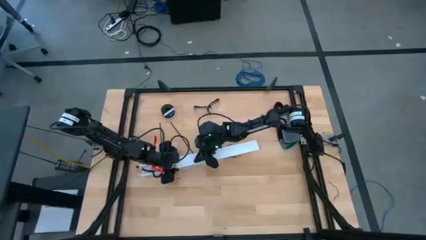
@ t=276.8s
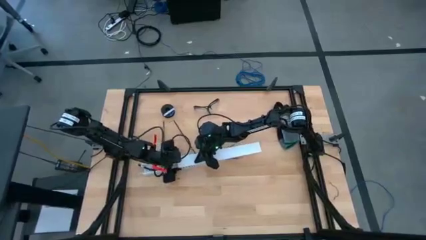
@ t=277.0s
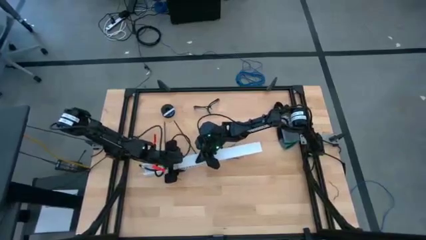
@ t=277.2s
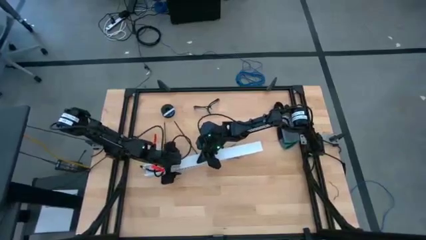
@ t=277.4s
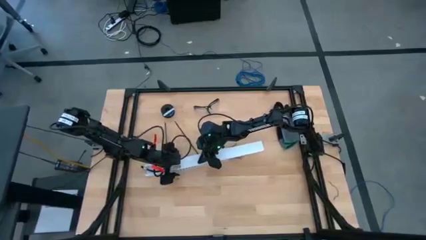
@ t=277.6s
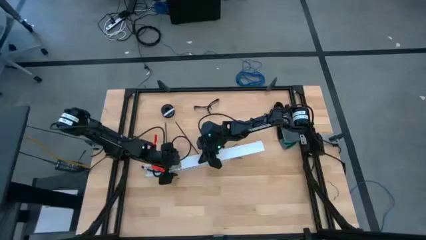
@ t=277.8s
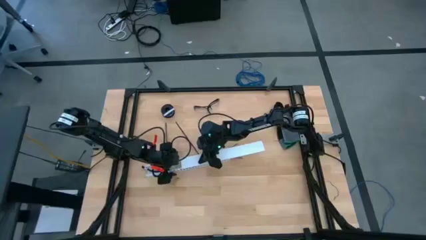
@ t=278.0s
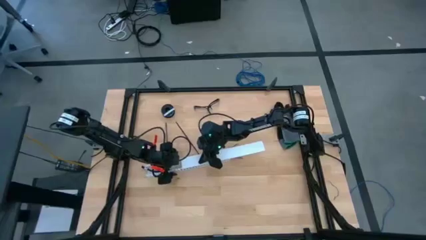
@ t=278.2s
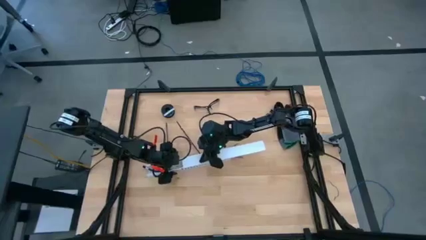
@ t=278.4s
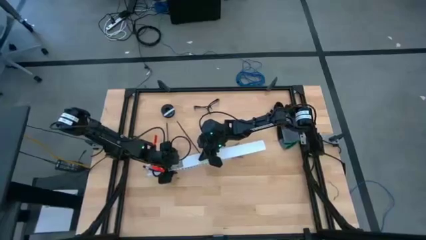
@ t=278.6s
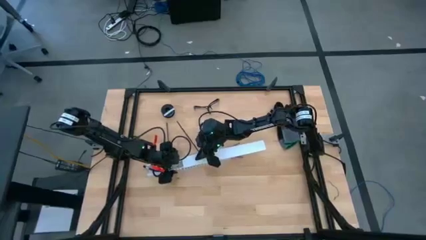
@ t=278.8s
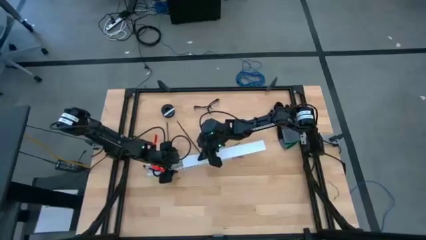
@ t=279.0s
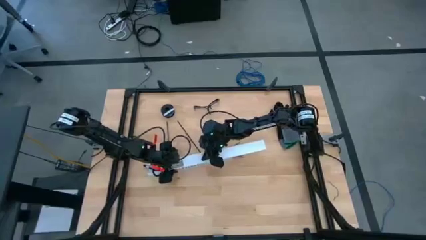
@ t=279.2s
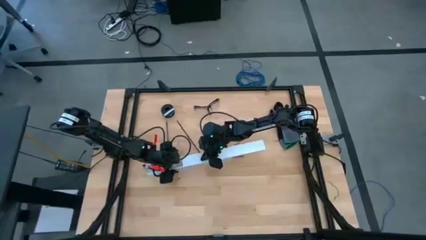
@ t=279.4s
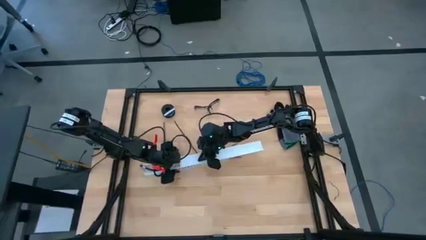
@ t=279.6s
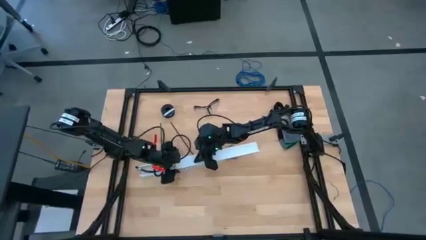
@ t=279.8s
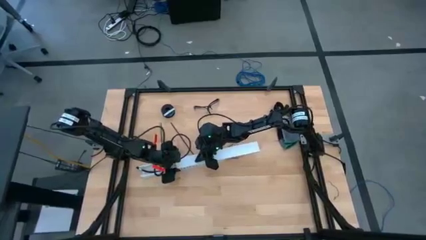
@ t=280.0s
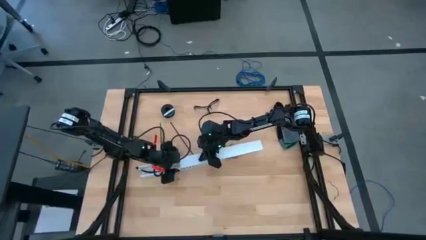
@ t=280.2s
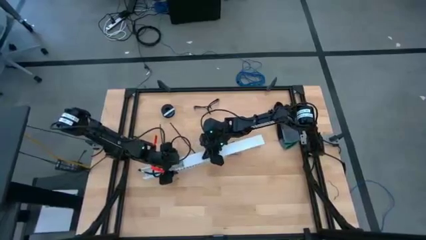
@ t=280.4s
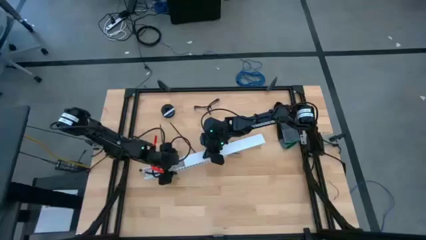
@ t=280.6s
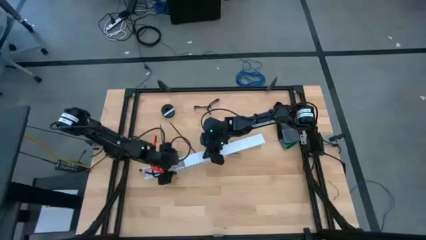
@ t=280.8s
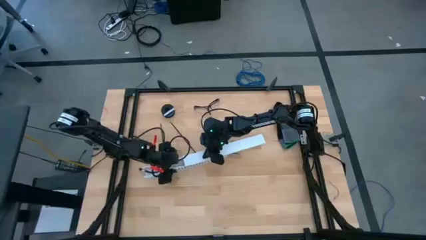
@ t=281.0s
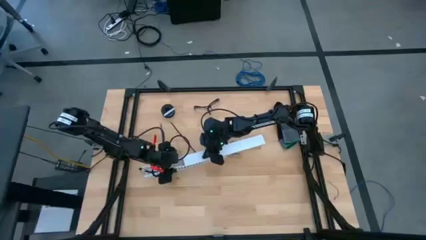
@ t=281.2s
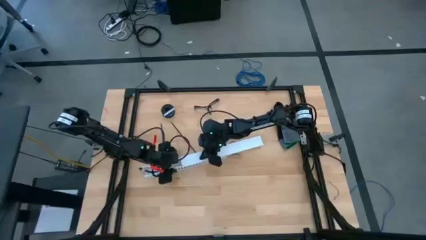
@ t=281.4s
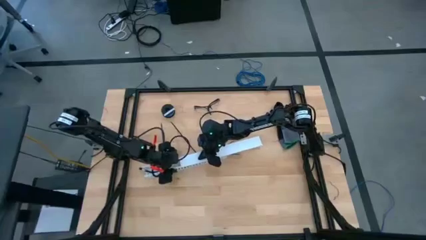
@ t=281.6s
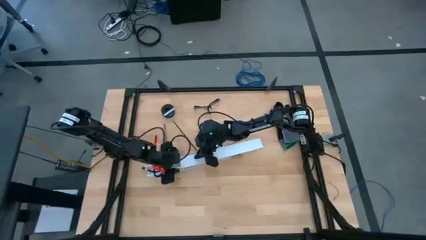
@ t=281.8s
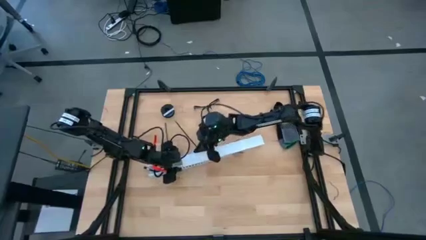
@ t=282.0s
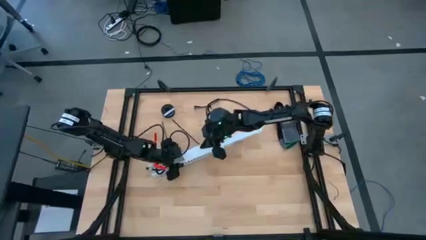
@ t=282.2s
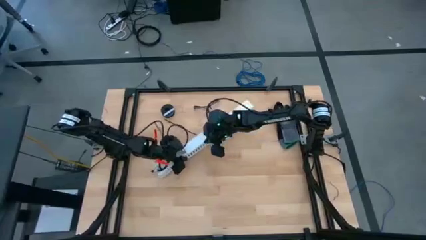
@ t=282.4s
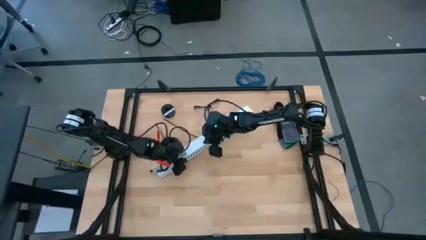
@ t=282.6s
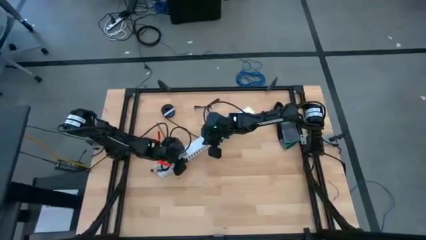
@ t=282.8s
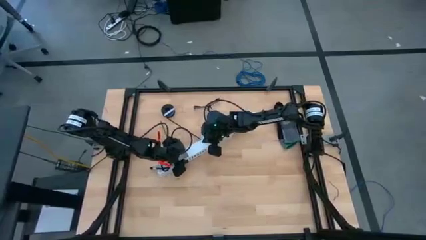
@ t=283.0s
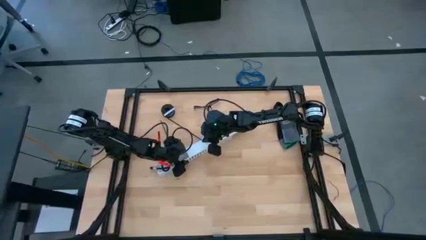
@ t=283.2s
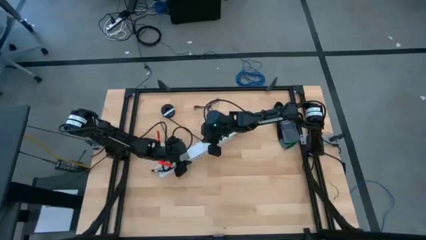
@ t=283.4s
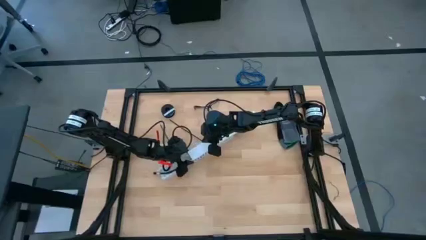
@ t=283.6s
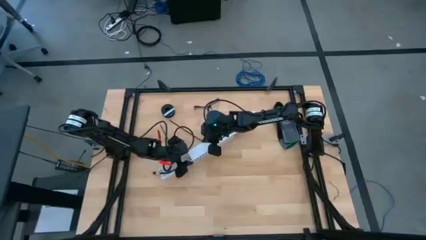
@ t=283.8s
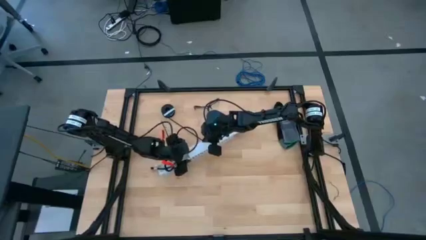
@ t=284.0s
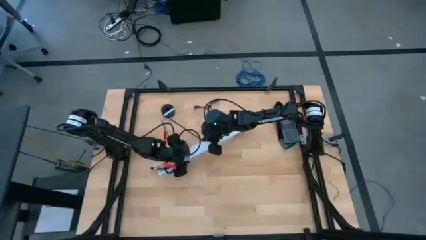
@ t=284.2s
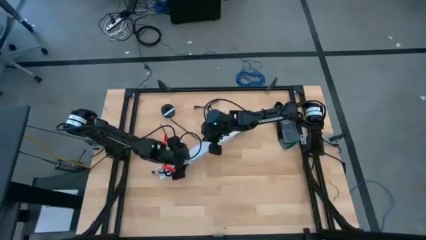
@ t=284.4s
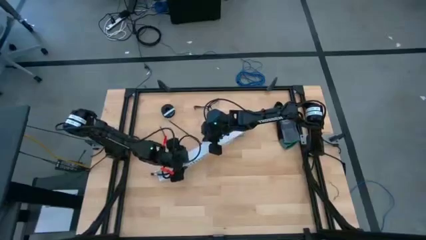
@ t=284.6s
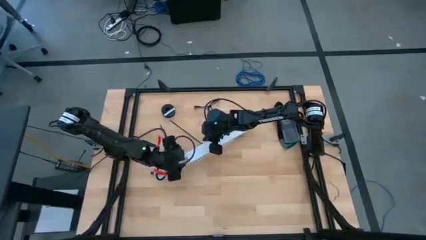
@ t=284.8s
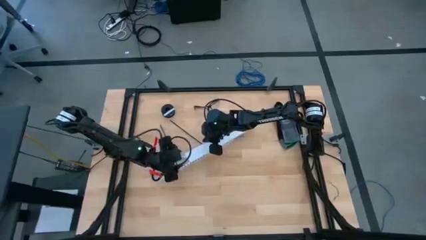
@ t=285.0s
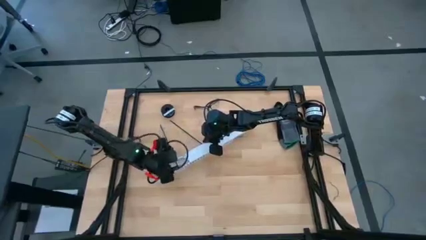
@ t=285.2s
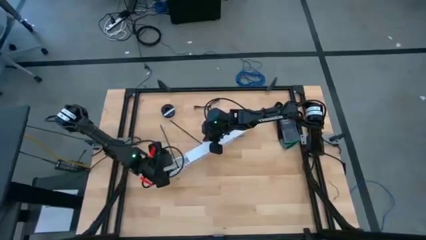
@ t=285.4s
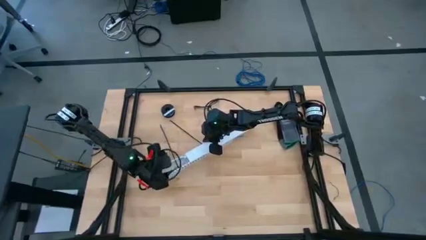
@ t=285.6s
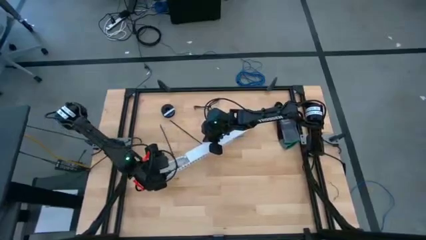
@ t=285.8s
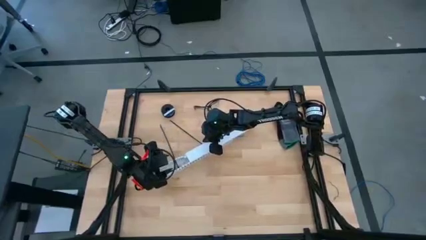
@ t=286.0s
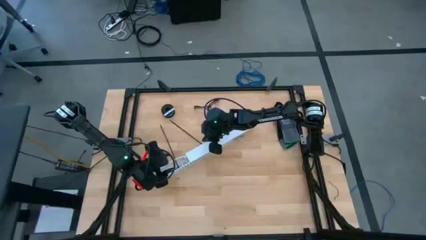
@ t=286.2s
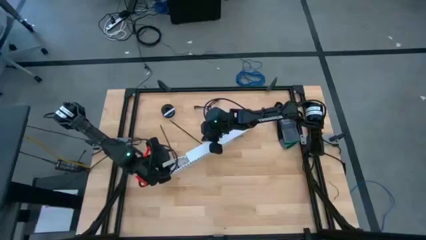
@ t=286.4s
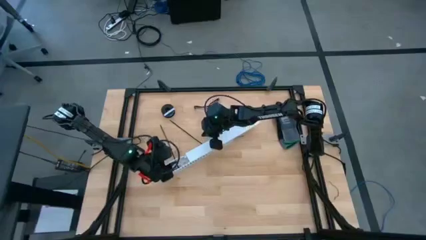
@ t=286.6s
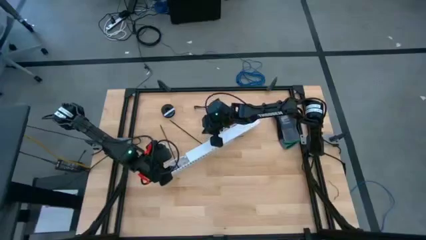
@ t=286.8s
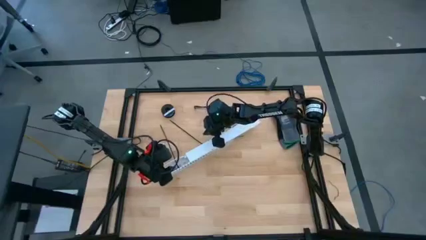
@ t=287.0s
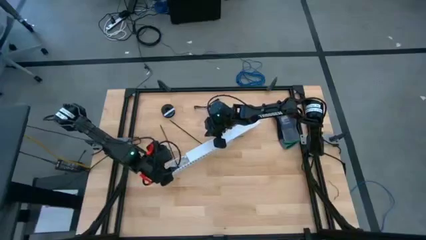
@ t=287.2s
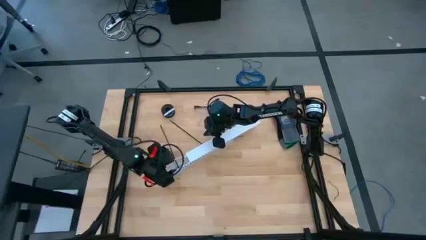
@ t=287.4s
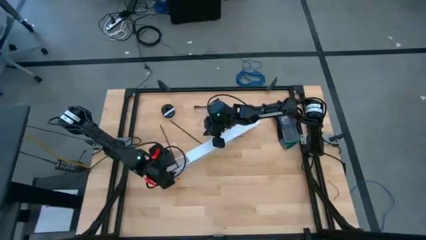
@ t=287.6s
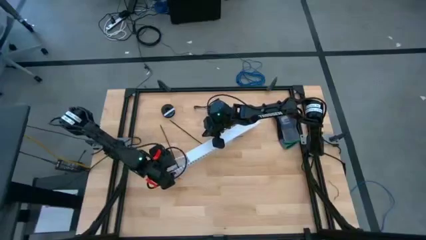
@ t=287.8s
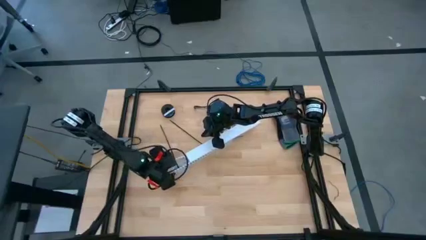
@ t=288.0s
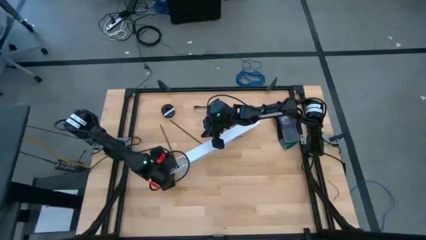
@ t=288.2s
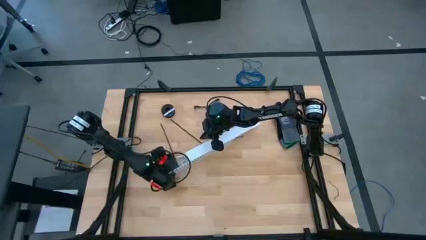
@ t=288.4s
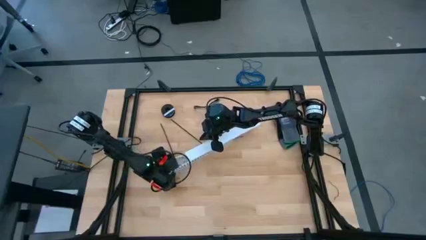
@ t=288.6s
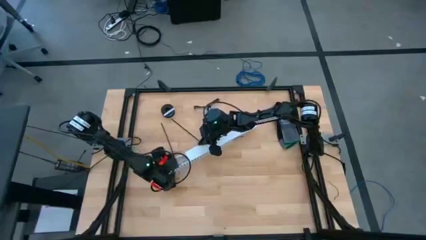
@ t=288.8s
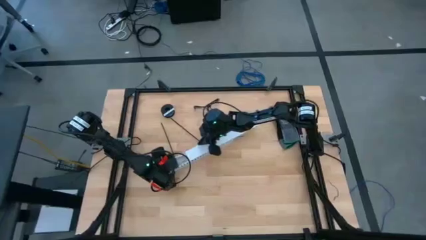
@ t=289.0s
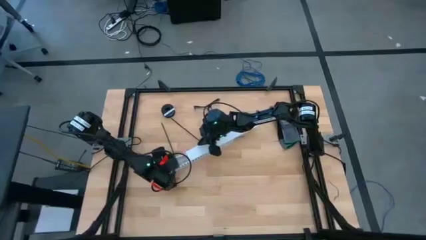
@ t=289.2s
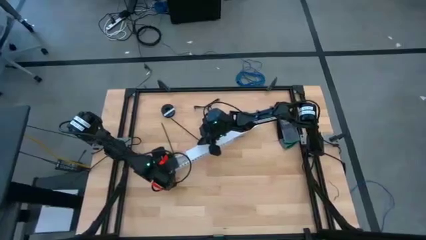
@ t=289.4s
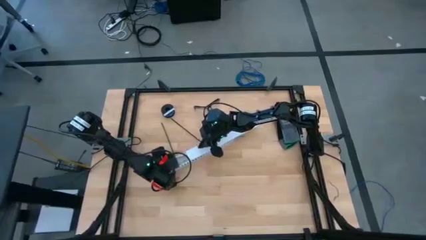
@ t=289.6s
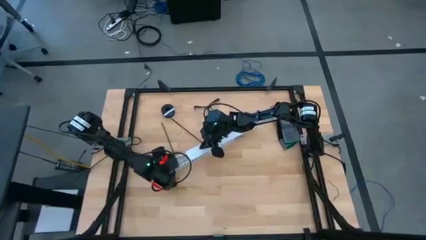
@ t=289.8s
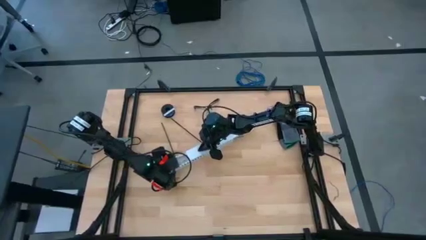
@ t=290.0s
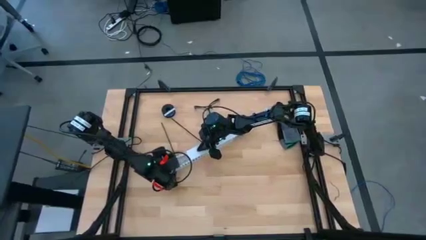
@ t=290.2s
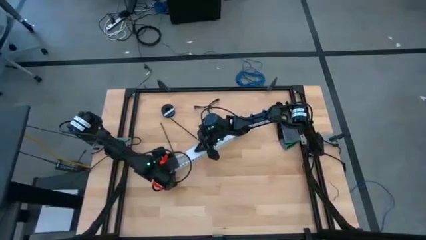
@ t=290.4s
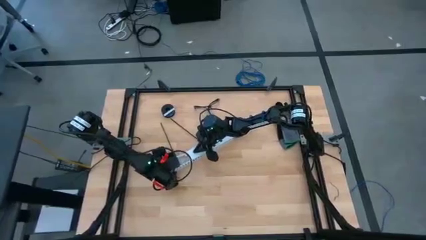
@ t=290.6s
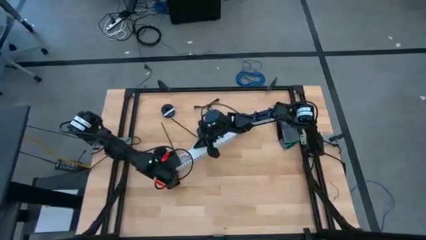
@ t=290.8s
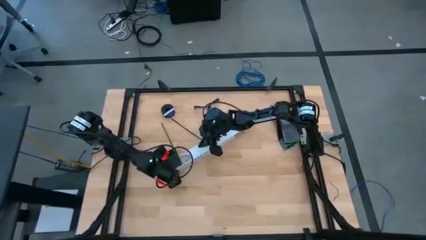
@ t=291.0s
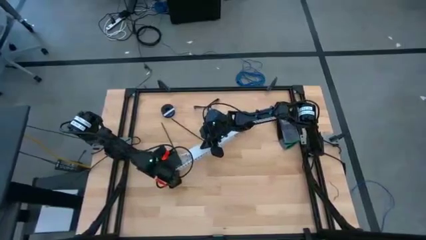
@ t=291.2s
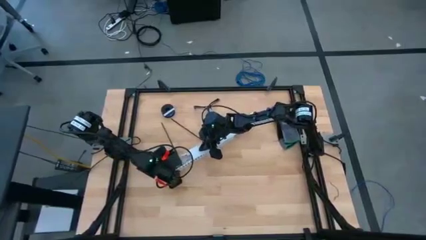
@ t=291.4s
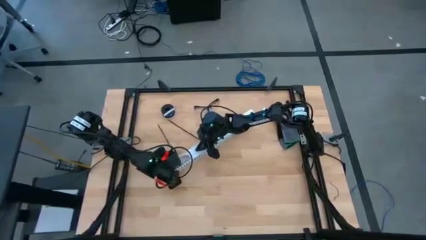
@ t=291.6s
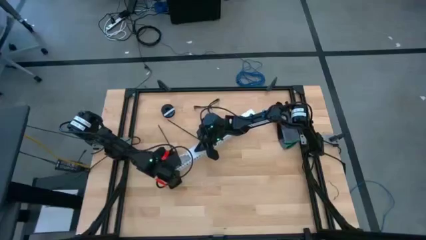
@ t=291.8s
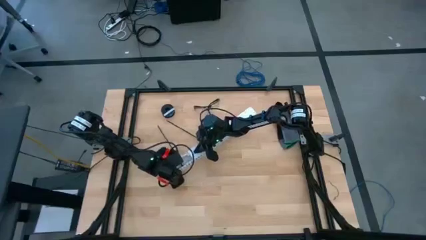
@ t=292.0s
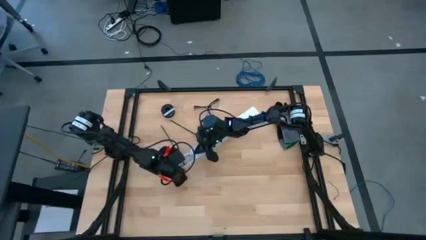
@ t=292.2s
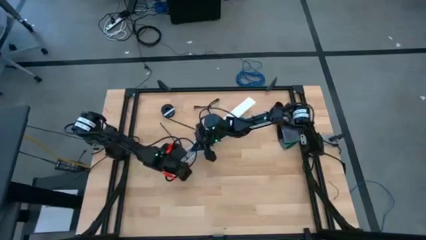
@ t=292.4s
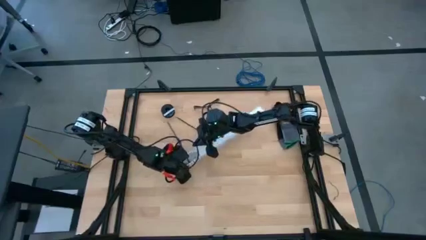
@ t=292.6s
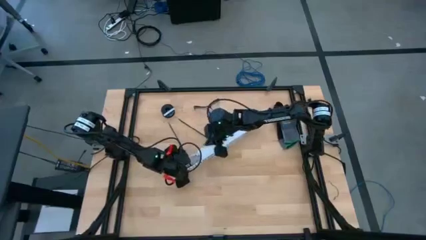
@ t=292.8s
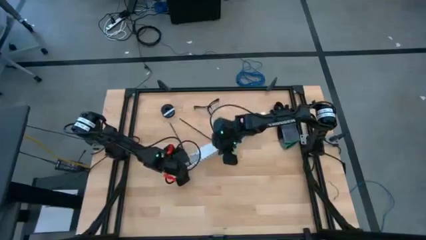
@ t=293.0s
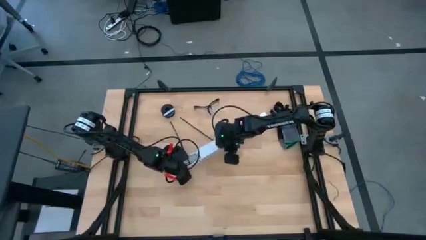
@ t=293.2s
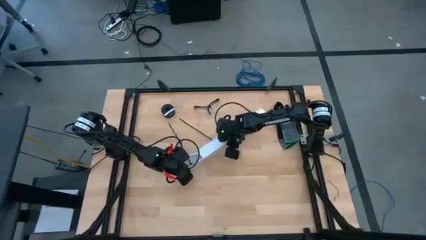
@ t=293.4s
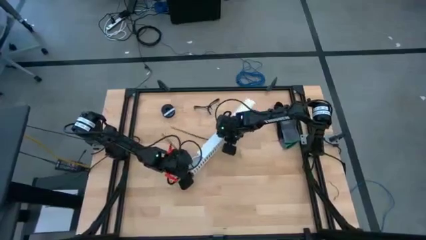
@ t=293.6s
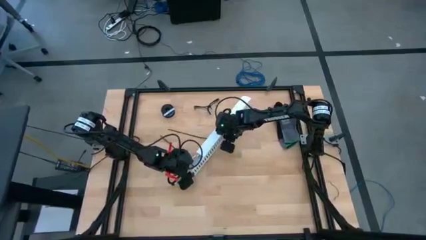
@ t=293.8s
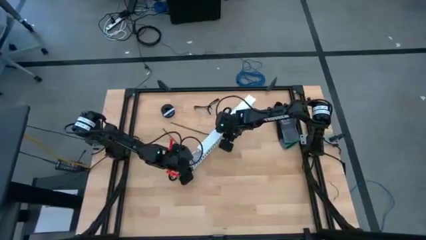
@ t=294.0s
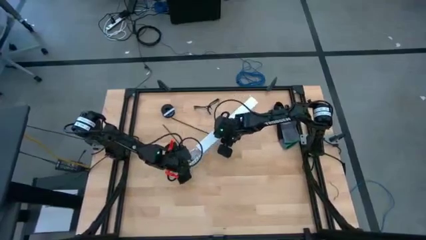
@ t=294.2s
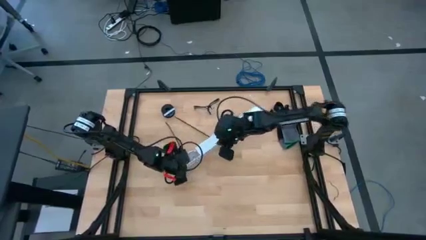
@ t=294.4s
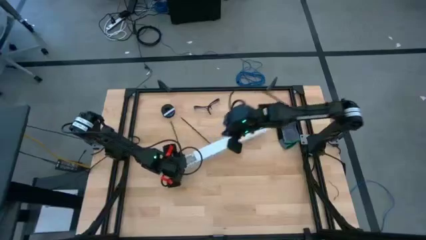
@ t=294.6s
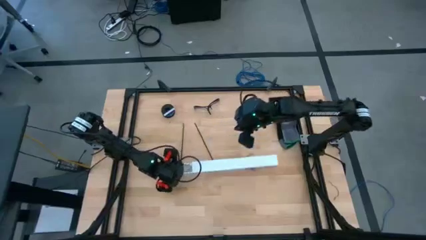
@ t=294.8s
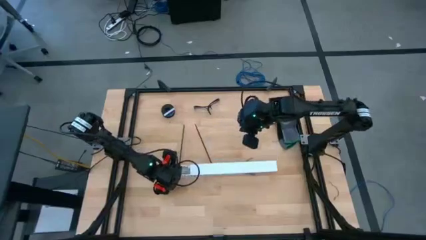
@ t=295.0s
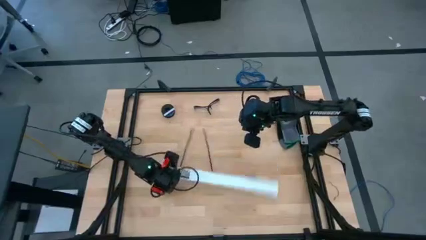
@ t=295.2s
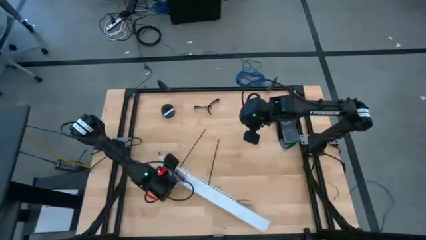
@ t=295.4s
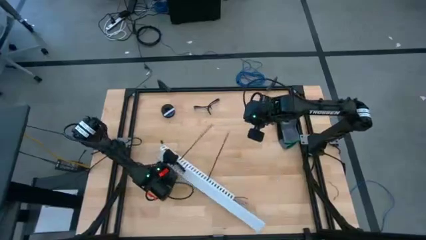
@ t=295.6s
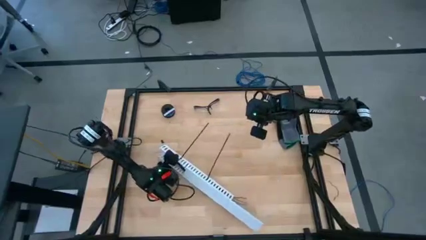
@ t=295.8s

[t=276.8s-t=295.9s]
Task: Ziptie cables
Close the white cable duct
